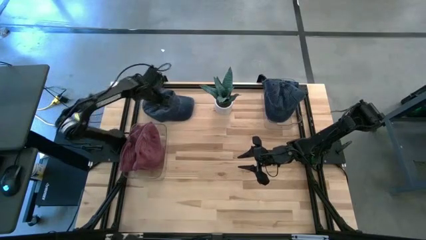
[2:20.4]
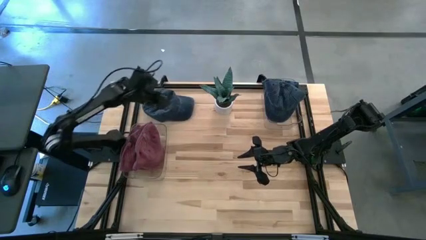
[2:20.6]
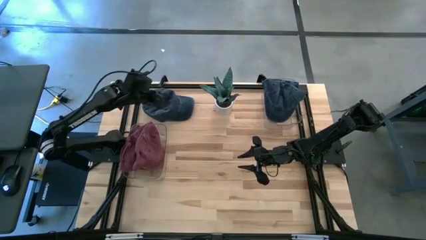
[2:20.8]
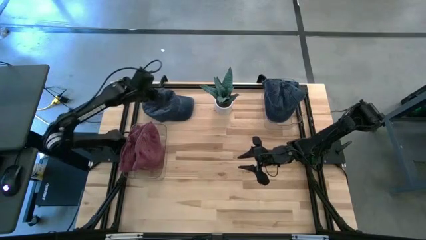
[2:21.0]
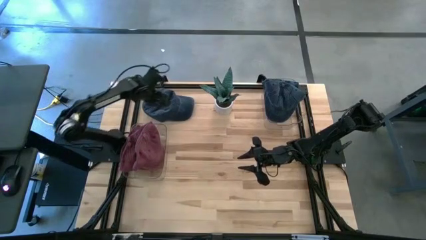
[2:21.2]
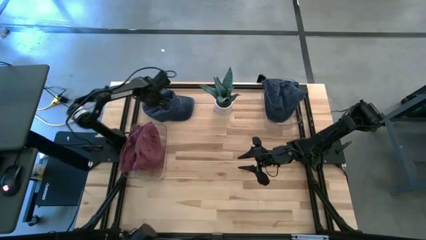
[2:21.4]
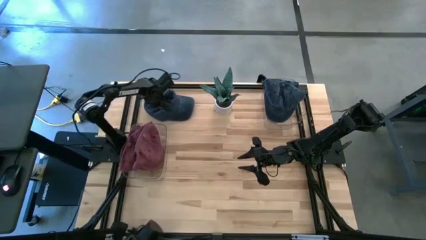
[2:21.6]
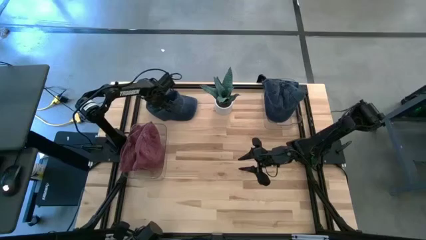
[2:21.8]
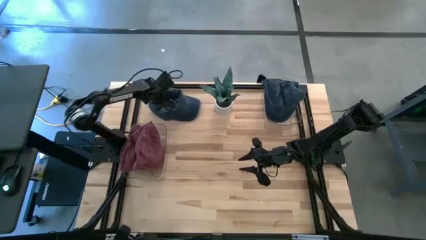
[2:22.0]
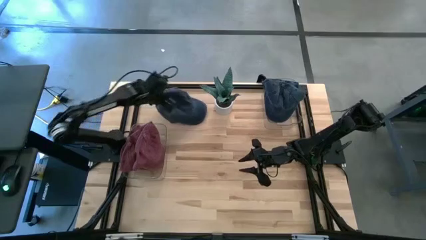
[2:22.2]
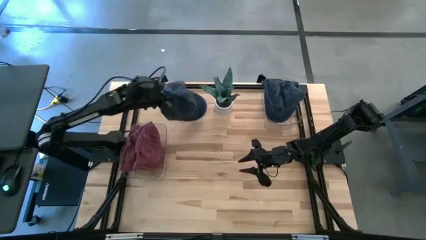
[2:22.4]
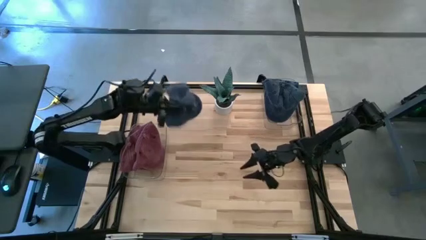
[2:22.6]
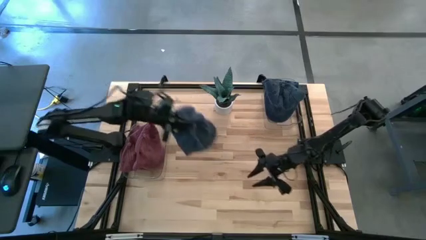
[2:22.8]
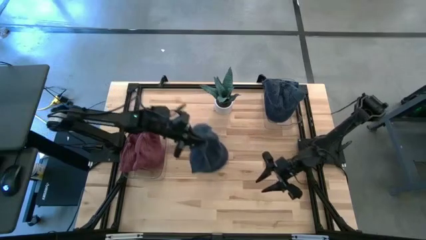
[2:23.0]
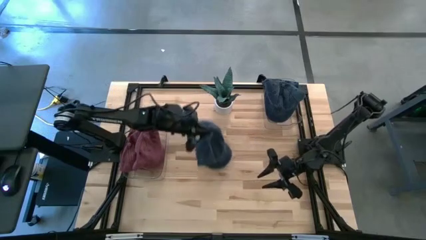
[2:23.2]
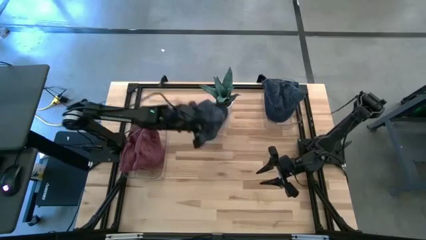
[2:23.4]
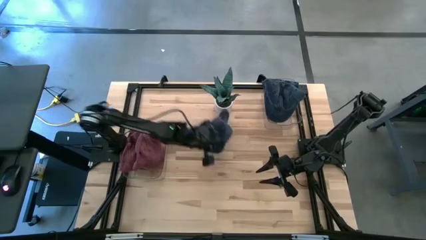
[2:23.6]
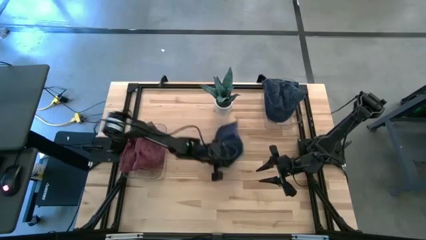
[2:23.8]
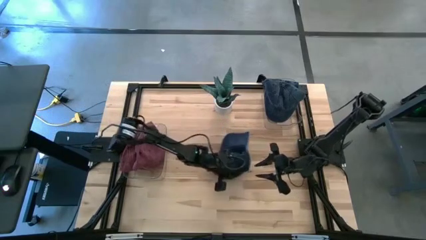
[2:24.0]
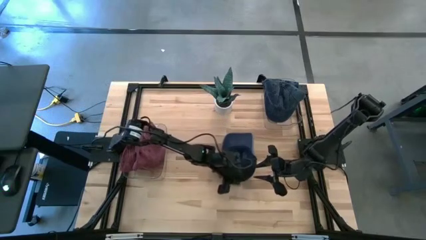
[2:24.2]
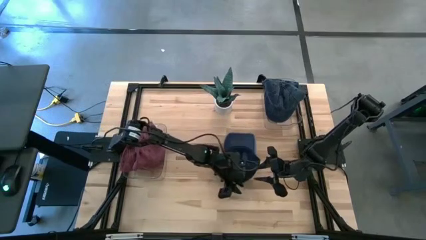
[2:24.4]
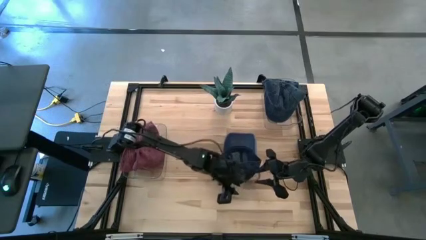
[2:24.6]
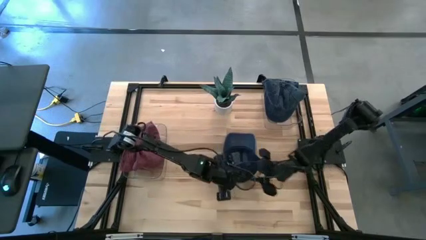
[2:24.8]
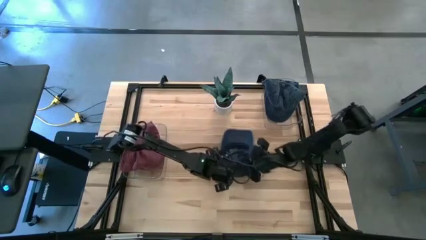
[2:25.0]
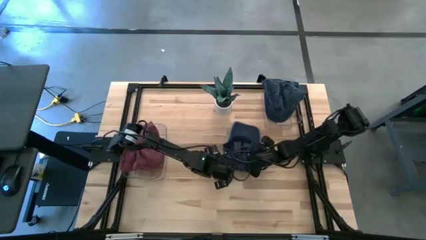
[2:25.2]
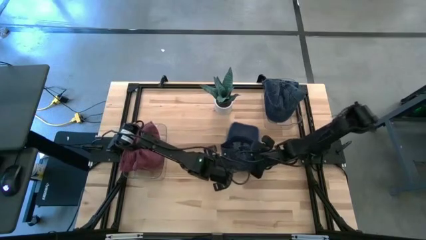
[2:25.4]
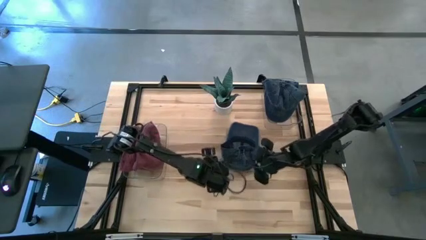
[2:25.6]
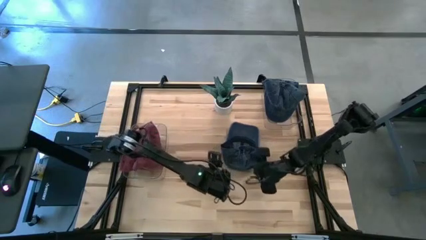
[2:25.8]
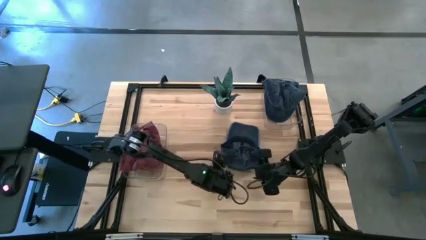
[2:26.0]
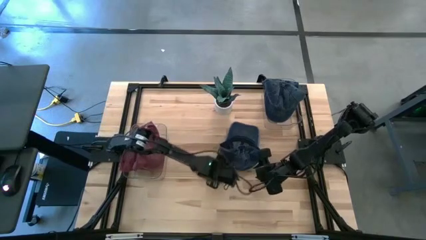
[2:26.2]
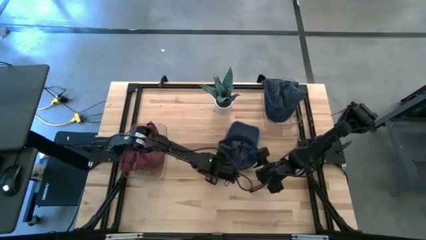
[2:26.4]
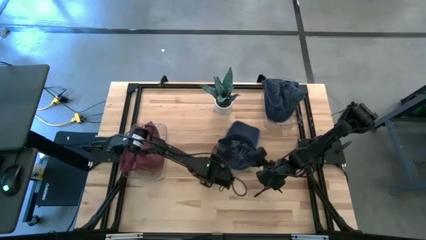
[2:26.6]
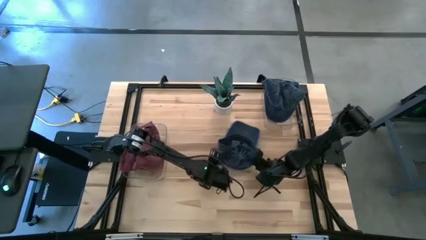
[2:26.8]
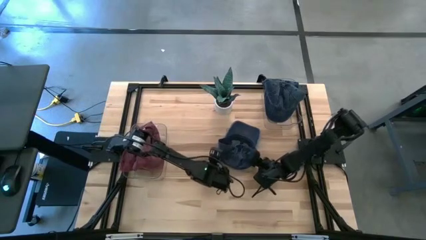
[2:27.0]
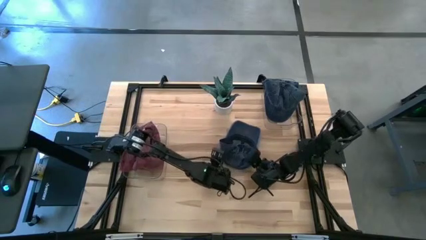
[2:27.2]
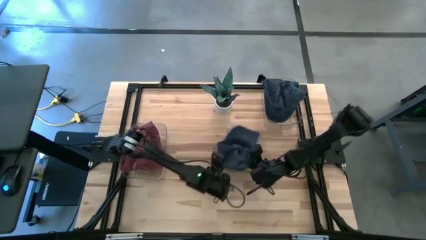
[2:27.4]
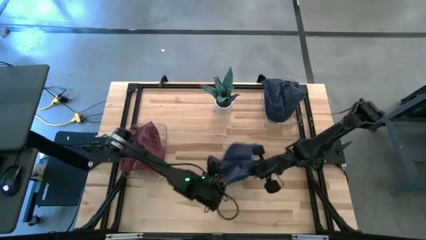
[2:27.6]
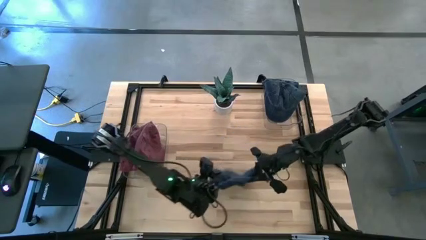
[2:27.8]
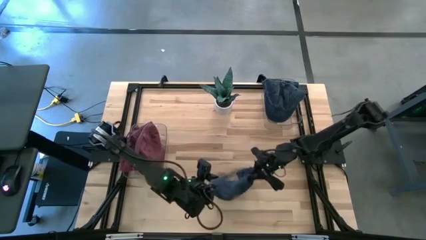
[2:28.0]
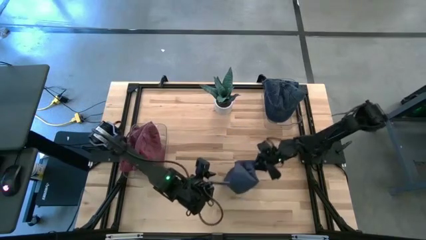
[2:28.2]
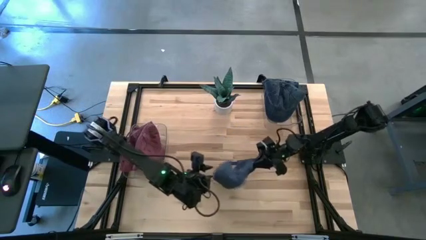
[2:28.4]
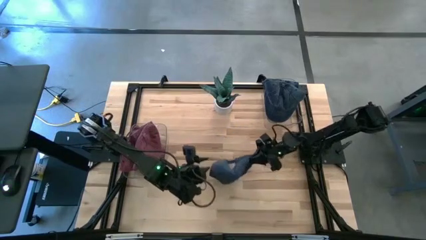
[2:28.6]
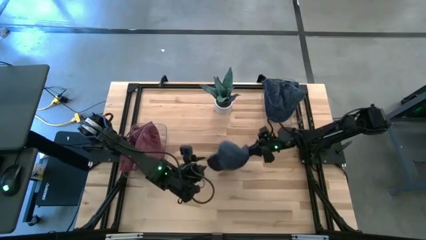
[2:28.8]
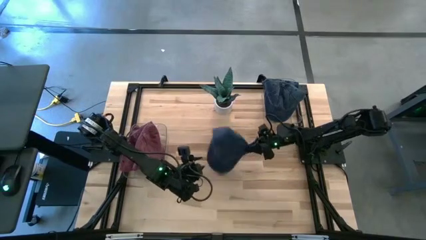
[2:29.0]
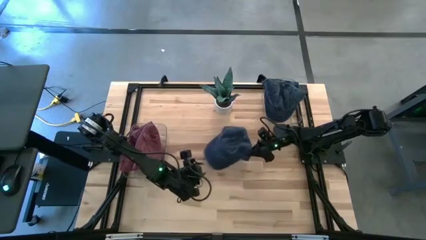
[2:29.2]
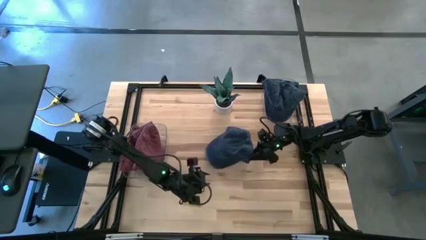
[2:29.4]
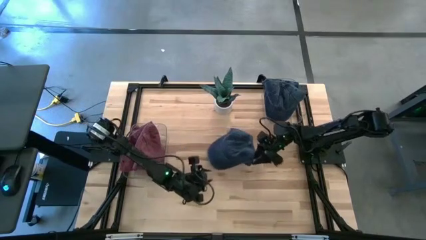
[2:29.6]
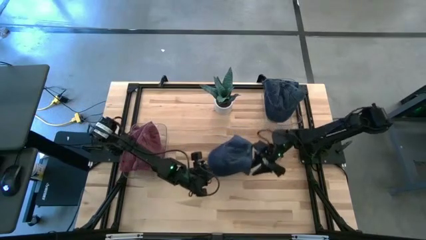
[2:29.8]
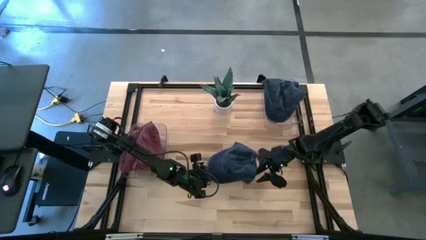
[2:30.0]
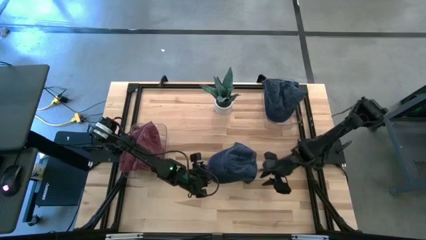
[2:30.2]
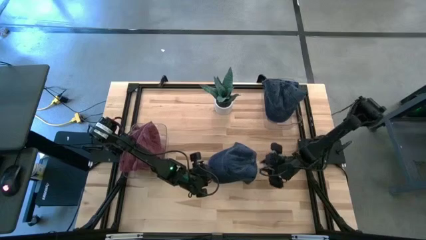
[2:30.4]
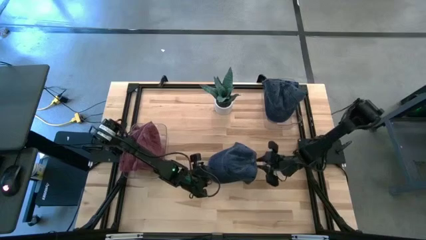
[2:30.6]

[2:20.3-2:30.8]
Task: Pick & Place hat
Put the blue cap into the right transparent bin
